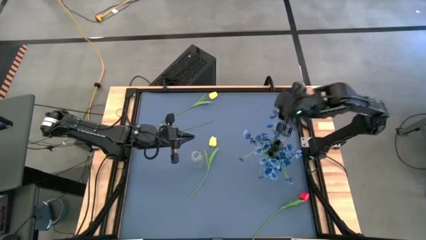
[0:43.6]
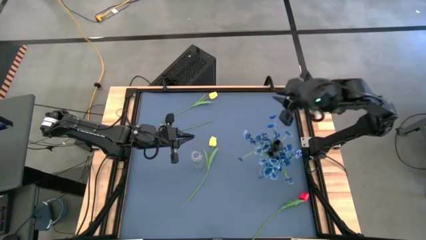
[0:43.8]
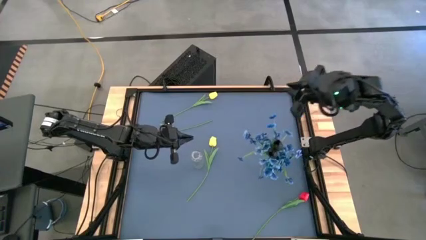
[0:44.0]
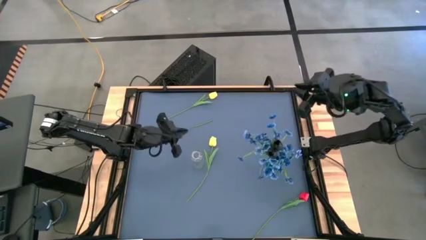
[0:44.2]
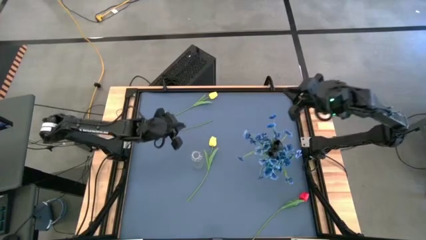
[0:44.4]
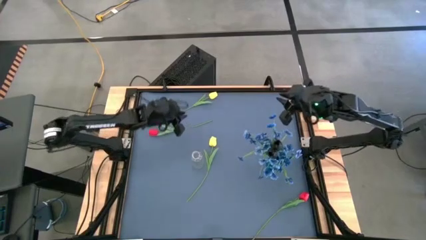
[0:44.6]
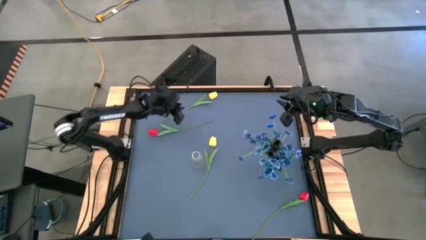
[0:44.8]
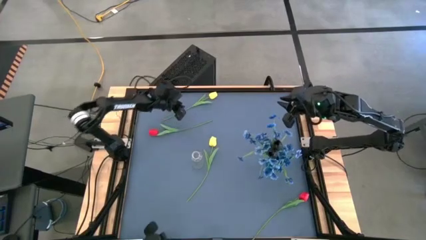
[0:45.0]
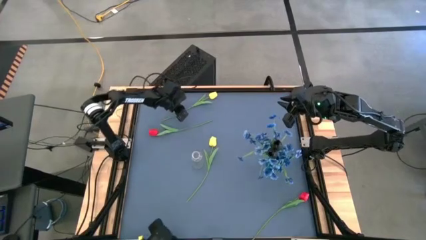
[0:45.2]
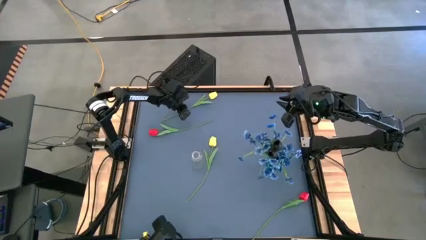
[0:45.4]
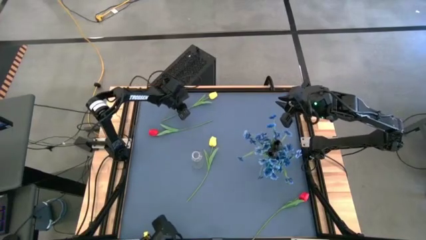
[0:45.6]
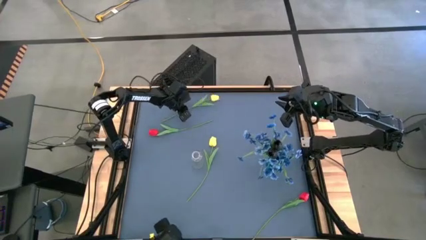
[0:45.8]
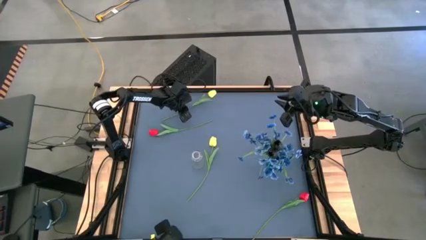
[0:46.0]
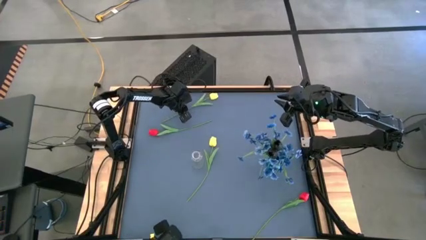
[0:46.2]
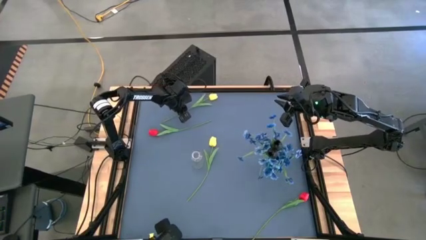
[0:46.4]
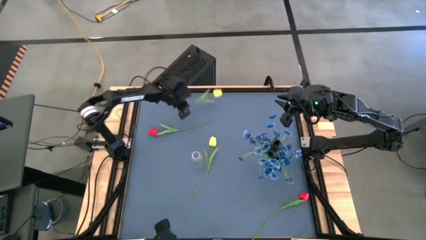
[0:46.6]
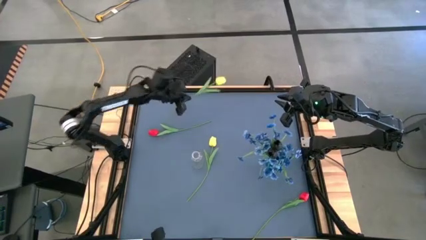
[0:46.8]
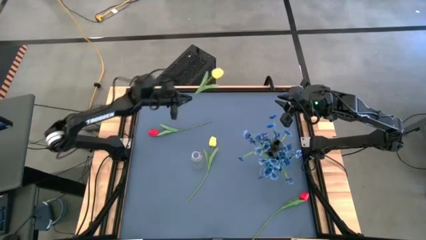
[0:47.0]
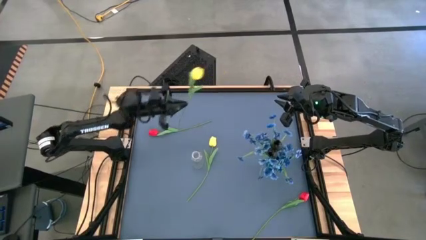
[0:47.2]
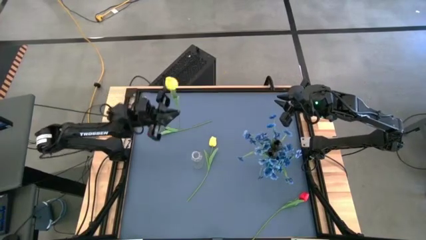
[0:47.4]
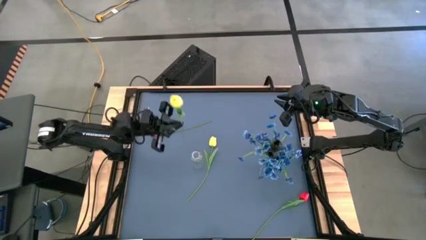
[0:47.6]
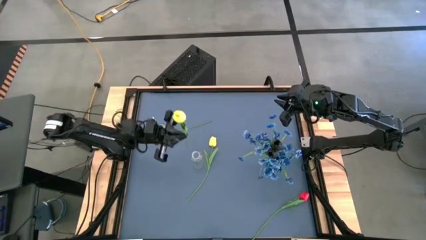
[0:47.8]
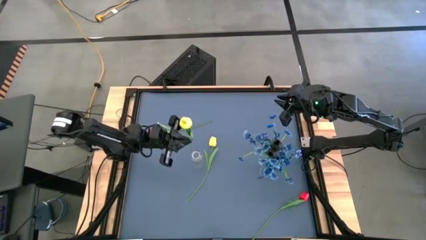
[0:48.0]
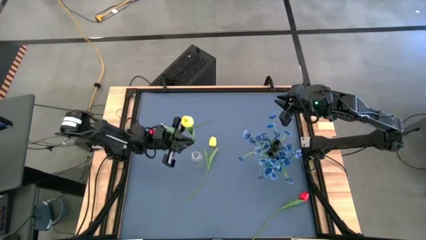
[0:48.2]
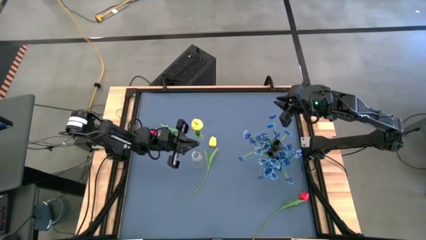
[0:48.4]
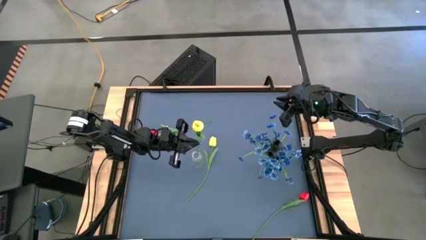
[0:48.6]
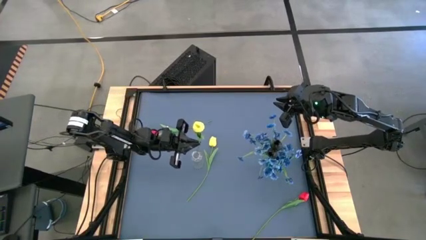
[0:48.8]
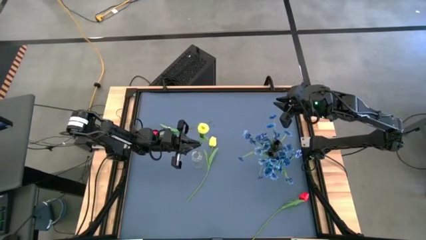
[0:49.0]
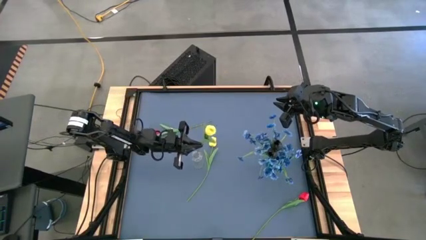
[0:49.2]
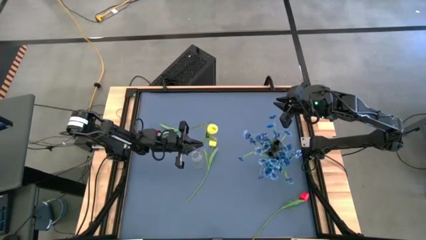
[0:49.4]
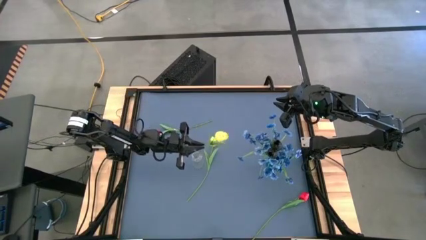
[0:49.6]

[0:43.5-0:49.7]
Task: Sort flowers into vase by color
Put the top yellow flower into the transparent vase

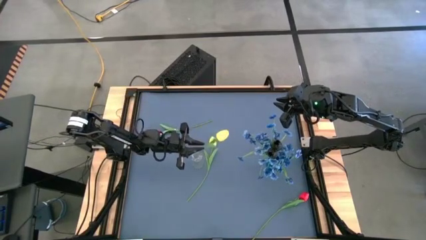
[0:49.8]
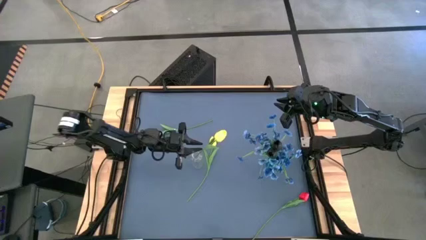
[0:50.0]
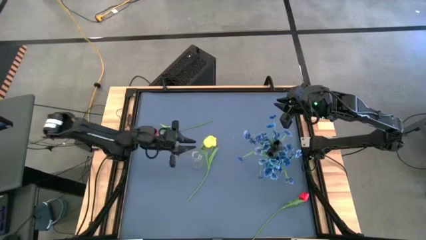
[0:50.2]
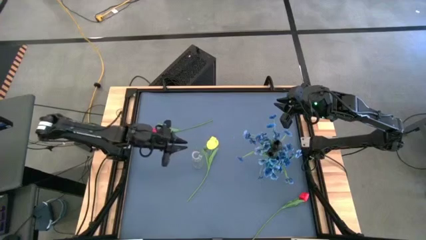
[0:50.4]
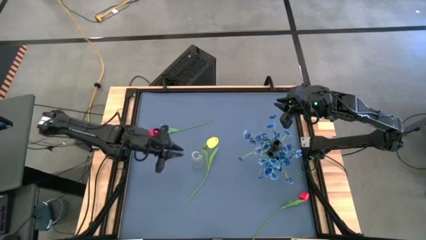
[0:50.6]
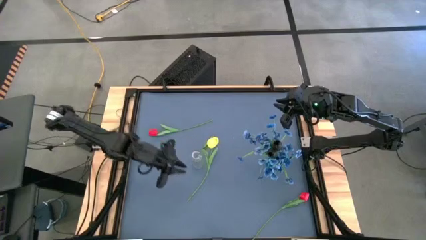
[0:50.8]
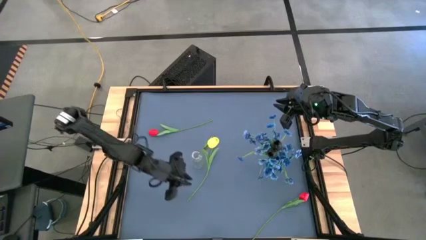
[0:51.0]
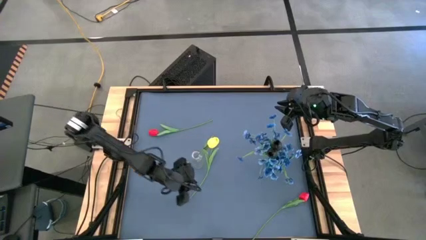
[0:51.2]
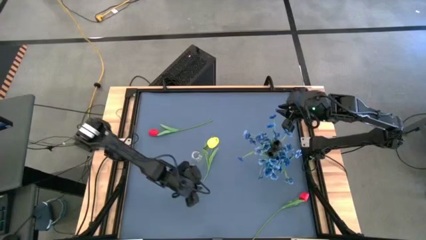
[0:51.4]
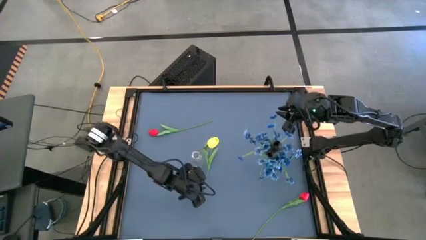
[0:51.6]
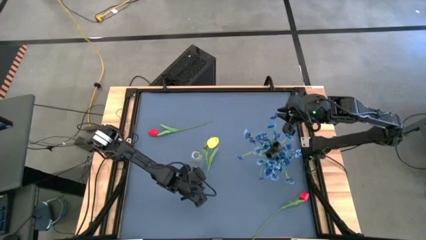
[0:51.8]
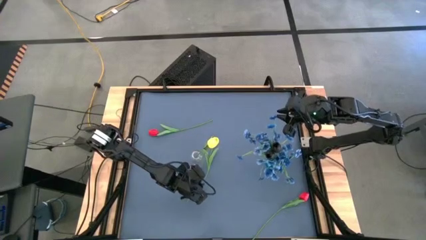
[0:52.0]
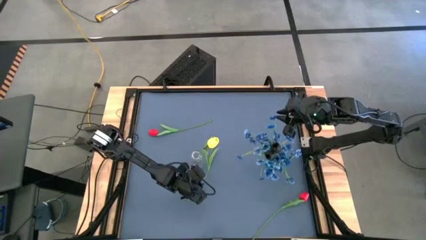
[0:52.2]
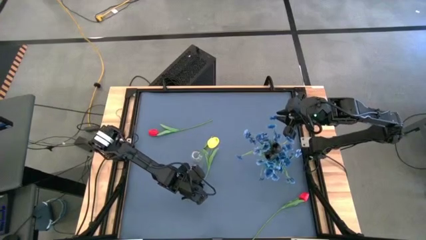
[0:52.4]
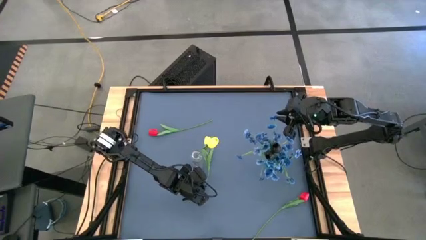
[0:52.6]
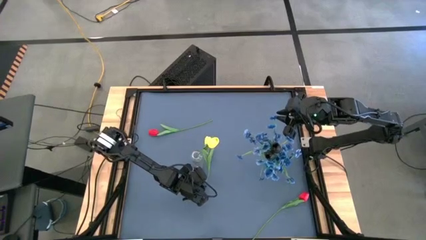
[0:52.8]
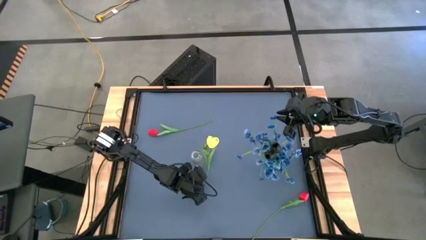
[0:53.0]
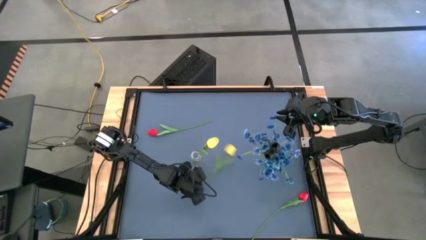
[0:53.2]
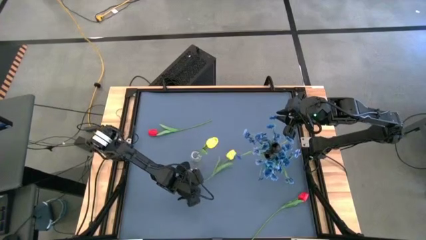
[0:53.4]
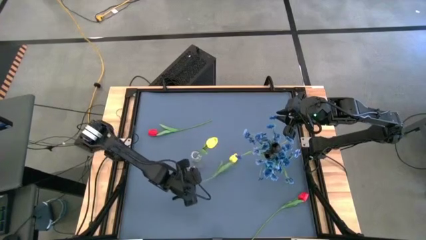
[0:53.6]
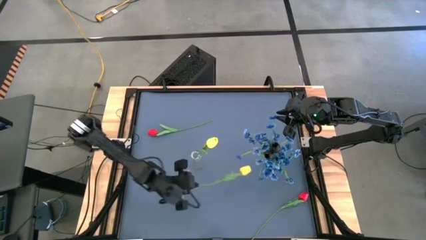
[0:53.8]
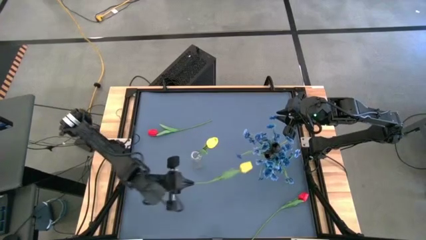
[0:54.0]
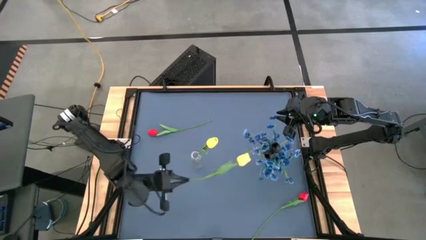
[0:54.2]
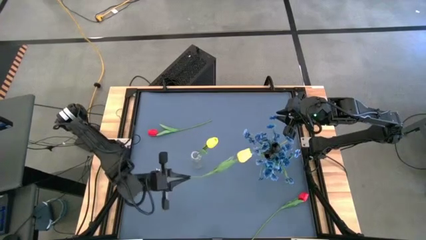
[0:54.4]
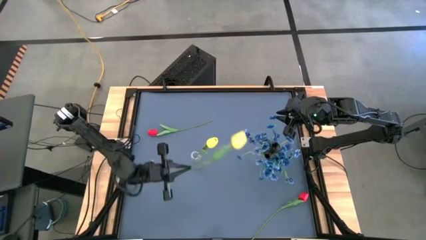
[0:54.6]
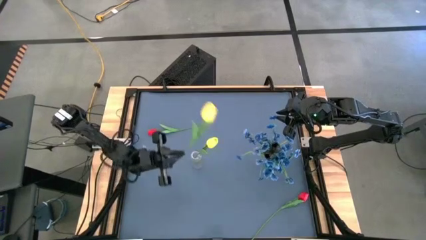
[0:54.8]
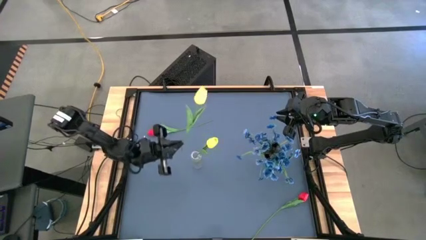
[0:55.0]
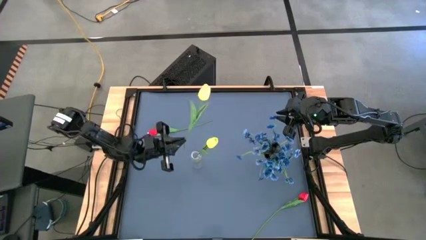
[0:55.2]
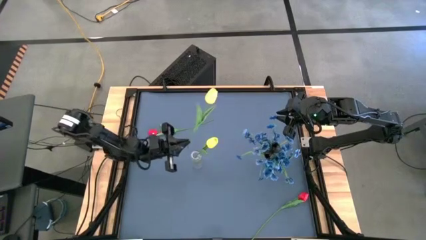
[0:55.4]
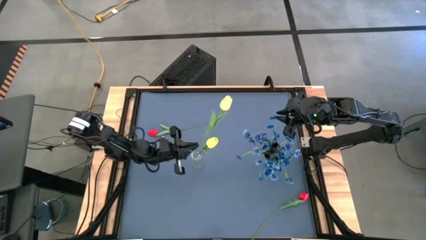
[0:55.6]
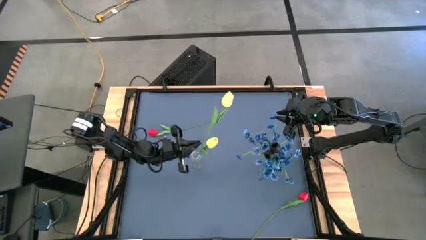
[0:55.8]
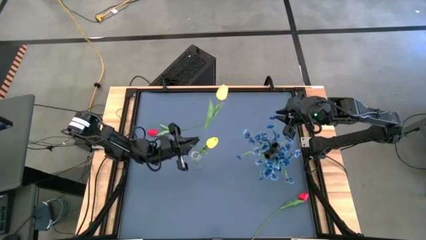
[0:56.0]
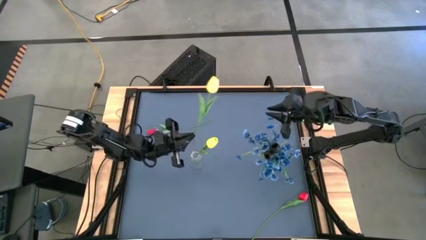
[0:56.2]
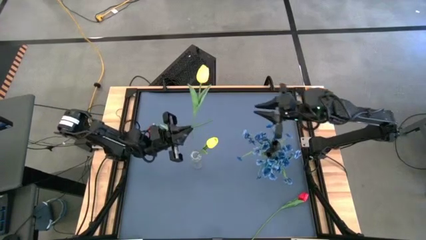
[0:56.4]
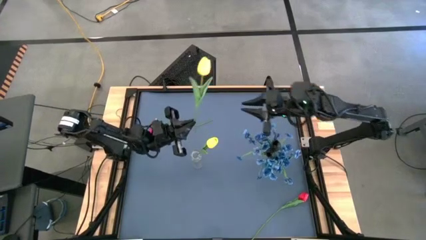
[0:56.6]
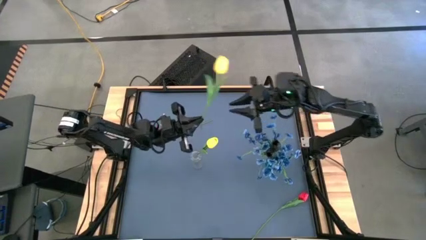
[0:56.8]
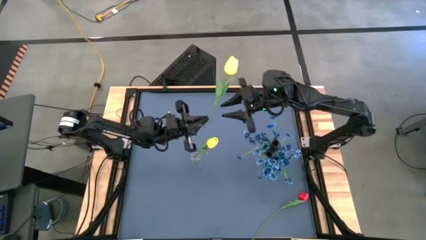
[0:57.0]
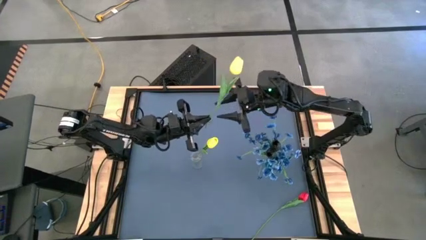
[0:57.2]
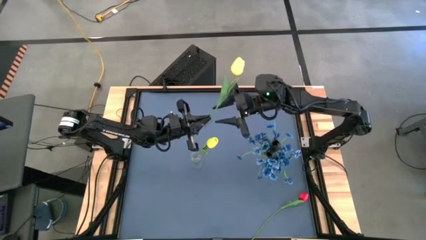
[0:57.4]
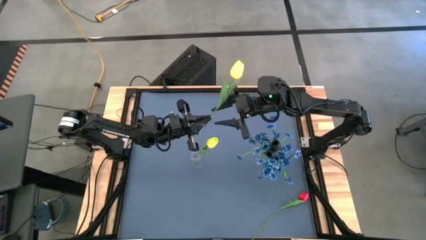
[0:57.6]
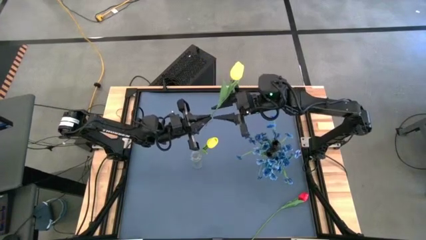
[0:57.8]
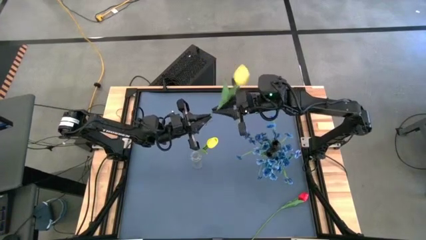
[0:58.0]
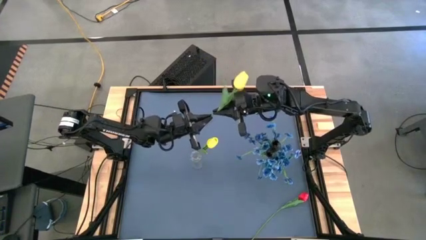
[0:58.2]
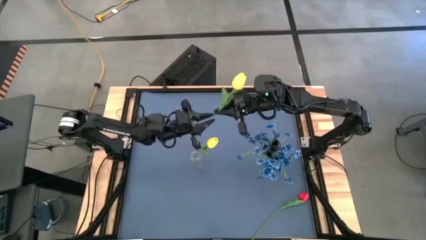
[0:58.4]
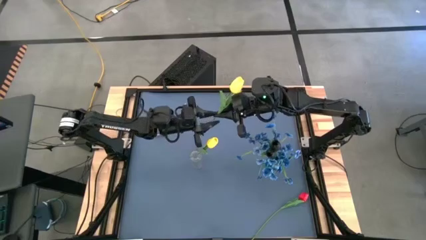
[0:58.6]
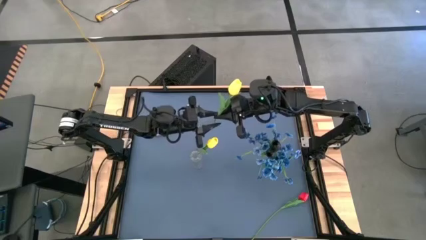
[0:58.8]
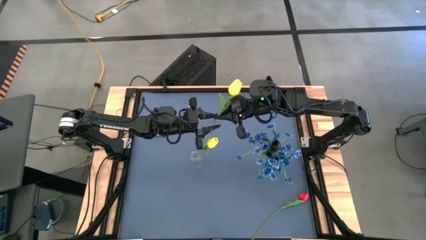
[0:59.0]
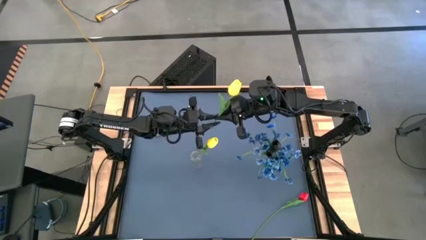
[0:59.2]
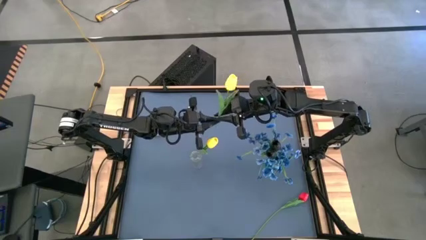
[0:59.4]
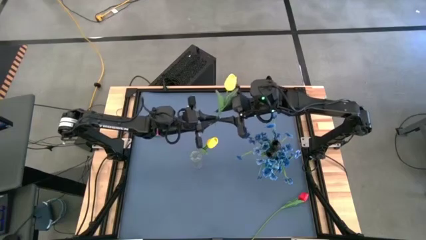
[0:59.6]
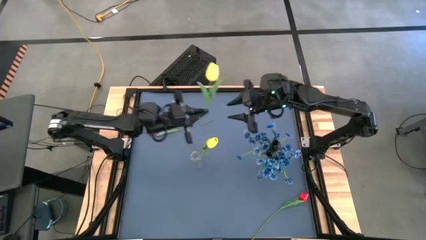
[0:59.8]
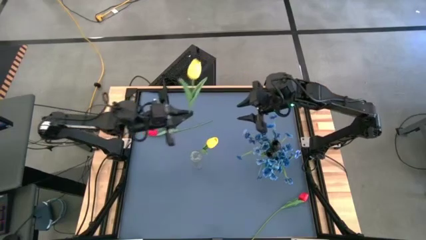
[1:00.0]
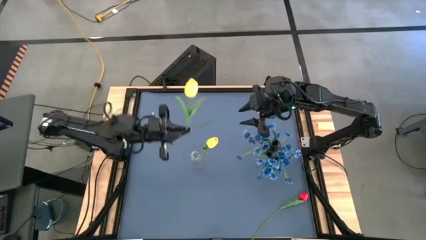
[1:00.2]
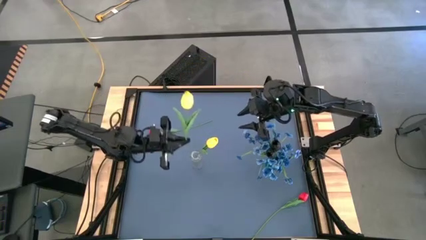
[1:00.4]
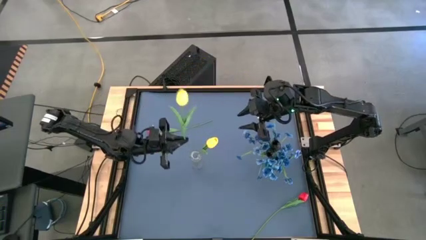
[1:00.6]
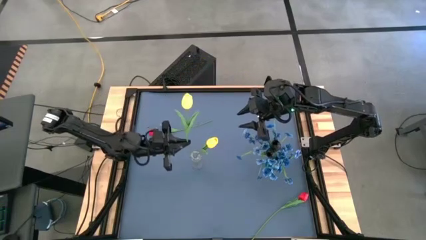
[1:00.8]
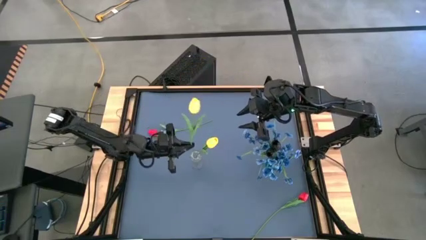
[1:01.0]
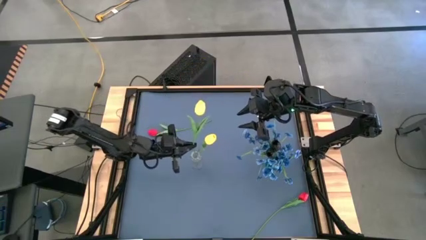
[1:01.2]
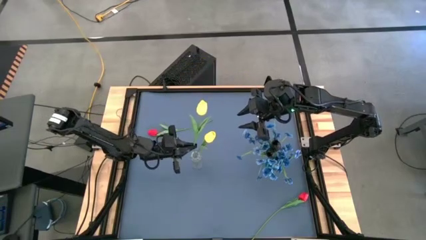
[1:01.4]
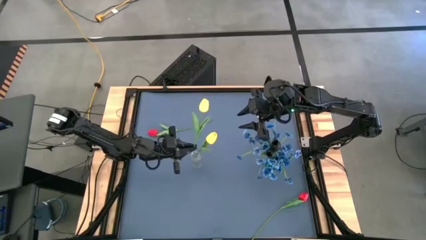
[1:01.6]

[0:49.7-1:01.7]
Put the yellow flower into the transparent vase
